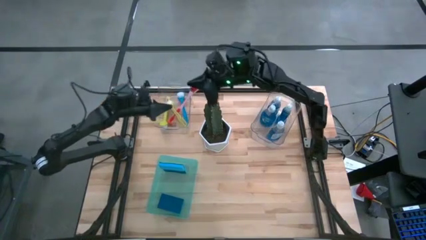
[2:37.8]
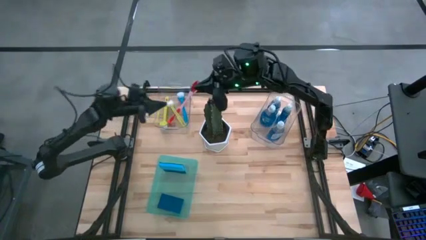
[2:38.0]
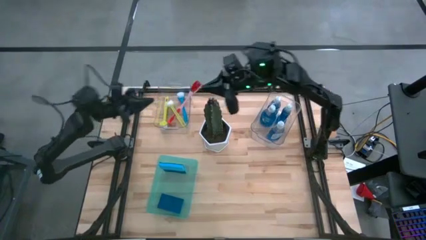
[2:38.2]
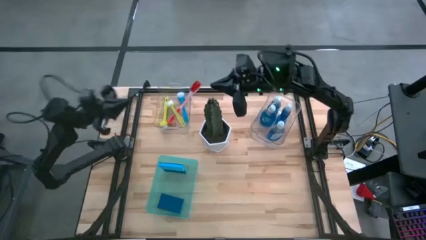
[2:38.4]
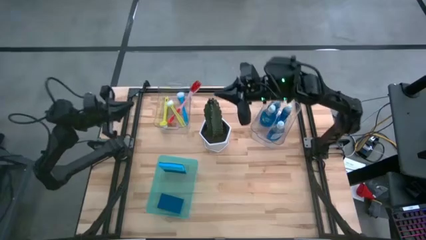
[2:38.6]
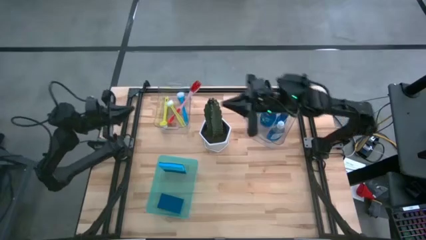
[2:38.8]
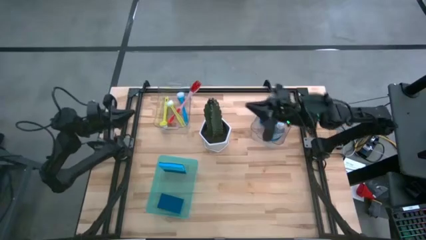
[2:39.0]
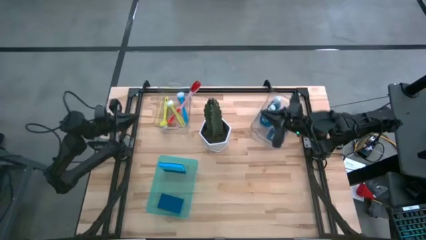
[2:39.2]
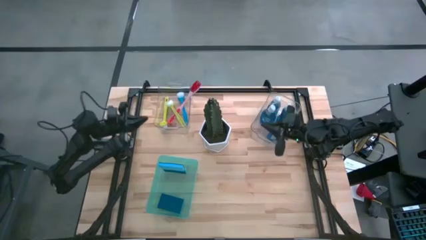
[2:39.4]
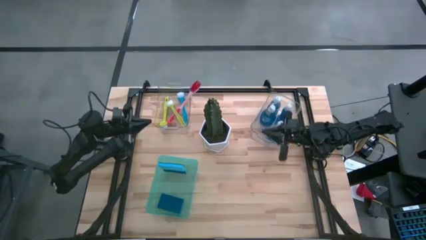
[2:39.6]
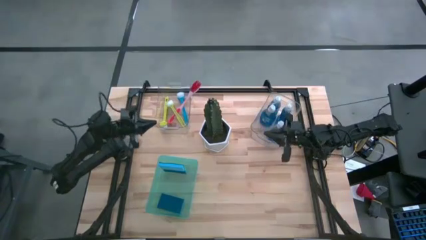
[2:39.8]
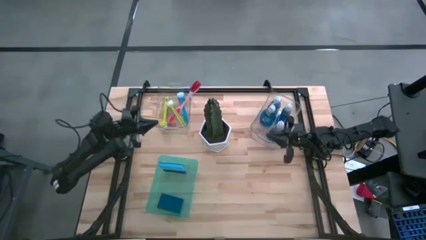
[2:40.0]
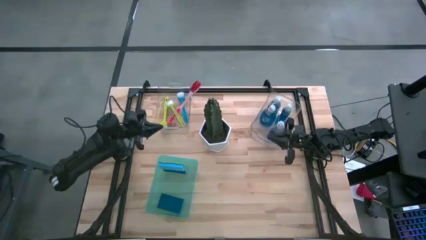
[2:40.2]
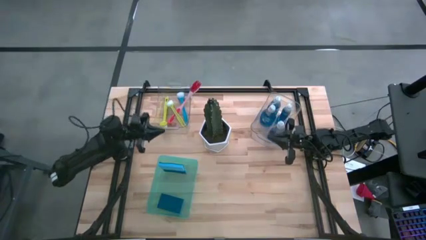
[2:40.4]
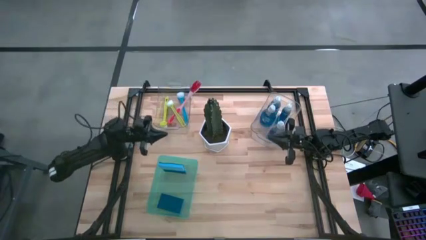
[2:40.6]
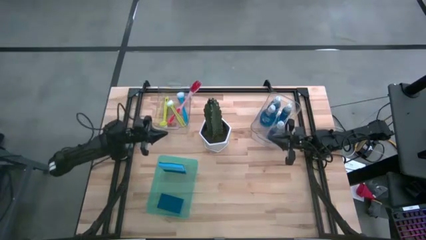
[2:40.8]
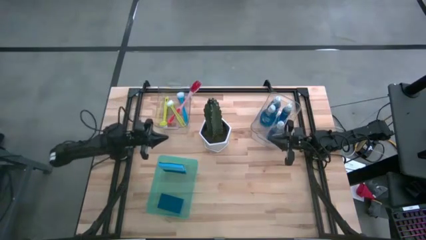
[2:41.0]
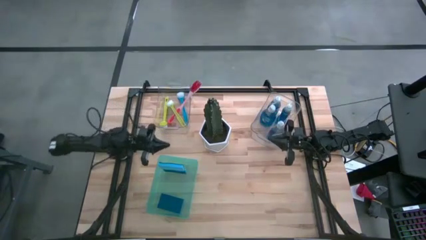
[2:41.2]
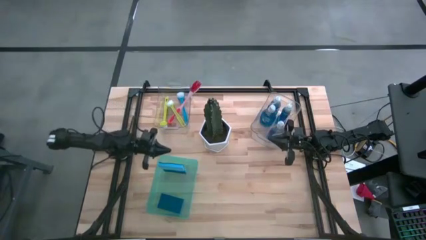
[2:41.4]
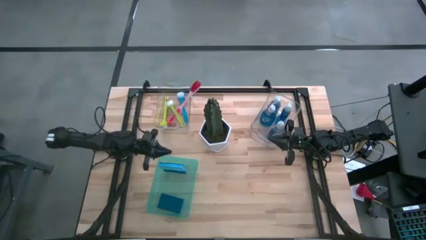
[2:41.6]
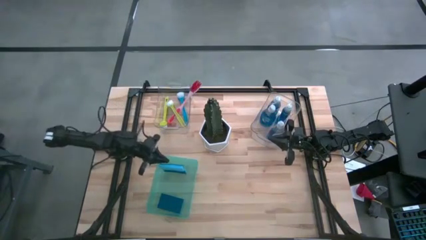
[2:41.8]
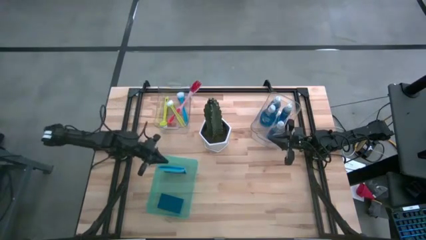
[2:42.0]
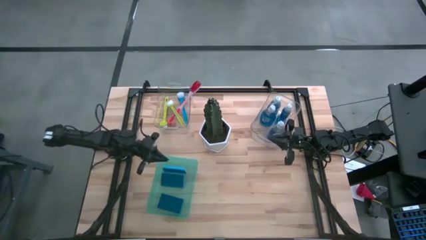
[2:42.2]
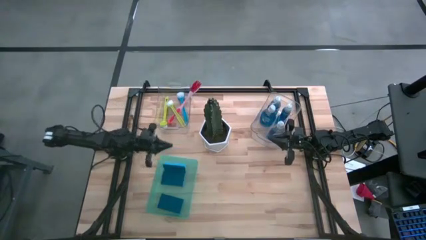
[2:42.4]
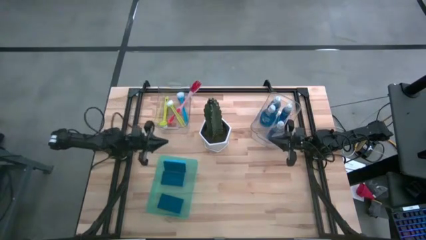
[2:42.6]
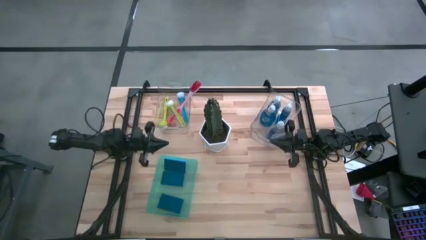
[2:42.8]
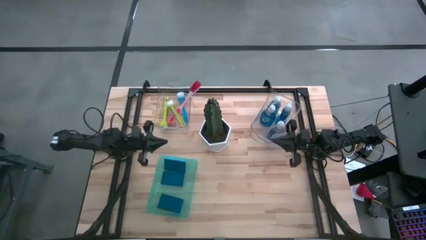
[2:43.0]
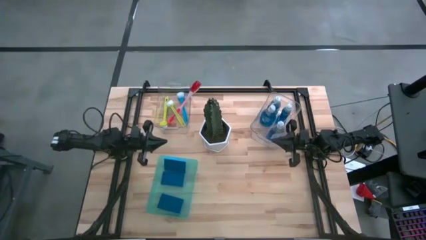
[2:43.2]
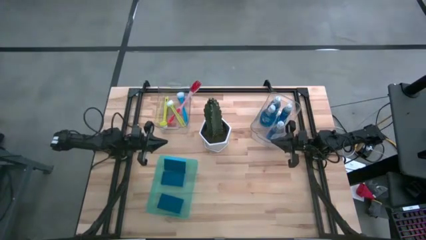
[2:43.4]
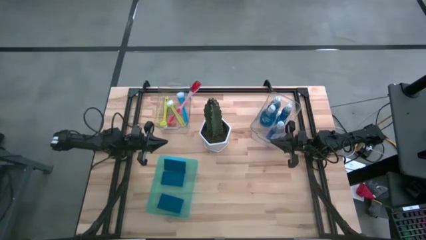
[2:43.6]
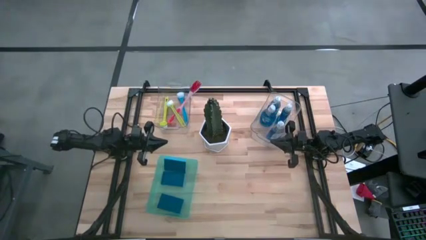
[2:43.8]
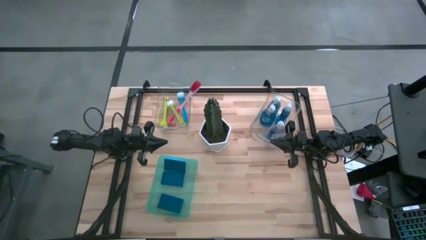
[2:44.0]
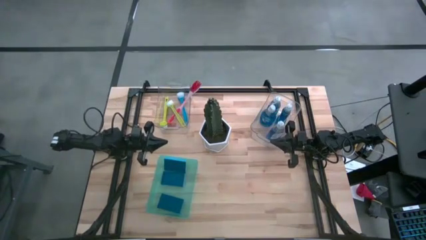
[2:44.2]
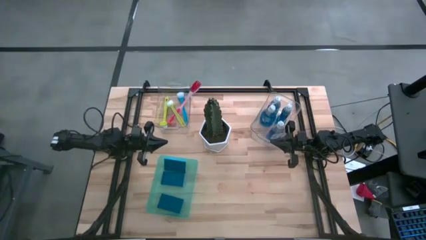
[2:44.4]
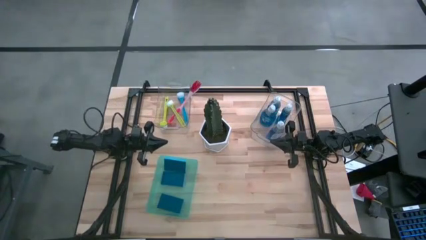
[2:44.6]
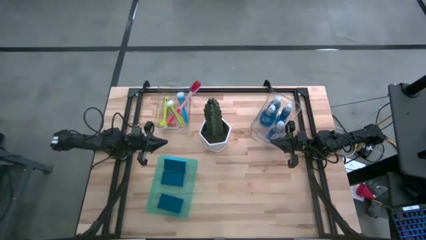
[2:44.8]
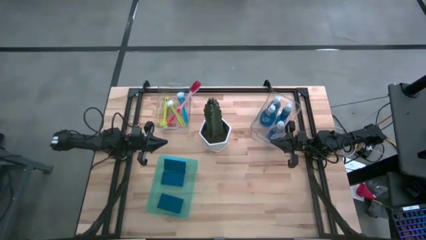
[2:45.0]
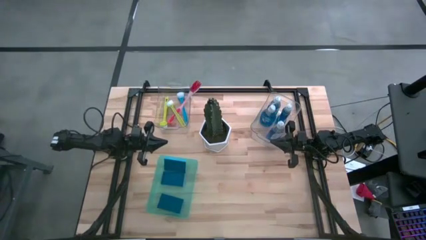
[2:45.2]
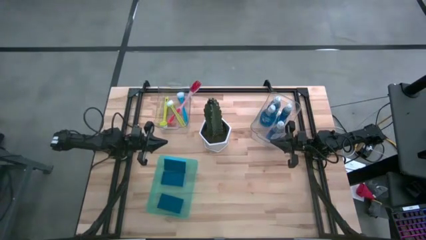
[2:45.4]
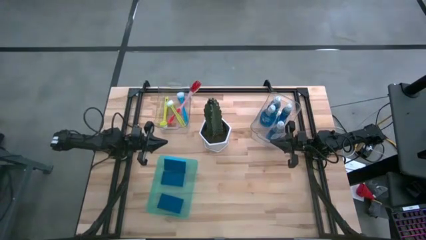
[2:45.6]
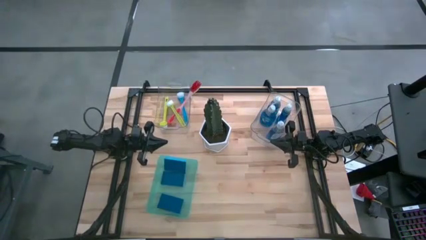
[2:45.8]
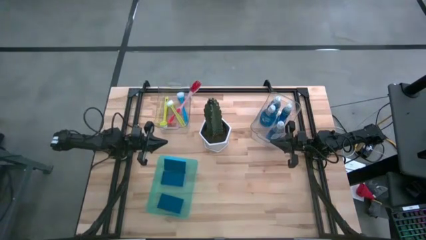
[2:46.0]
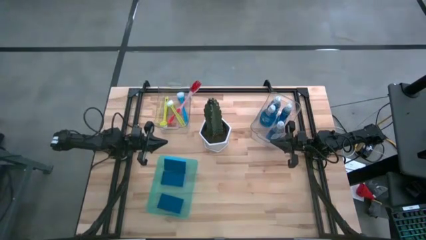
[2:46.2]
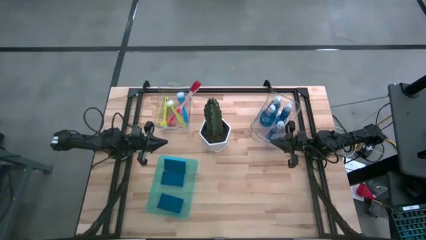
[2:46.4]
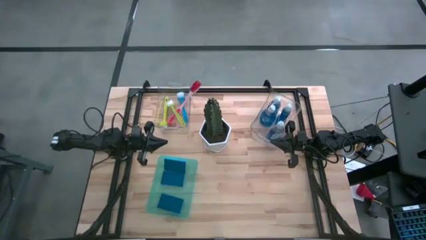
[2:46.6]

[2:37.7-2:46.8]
Task: Pick & Place Kitchen Sink Supplies
Return to Home Position

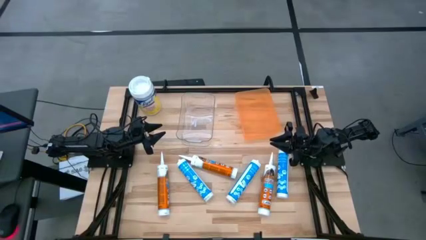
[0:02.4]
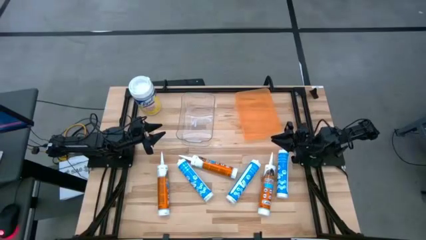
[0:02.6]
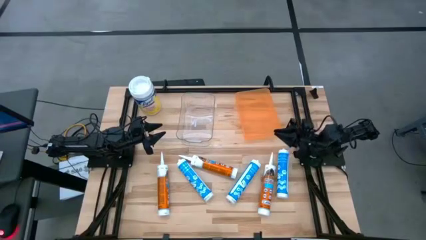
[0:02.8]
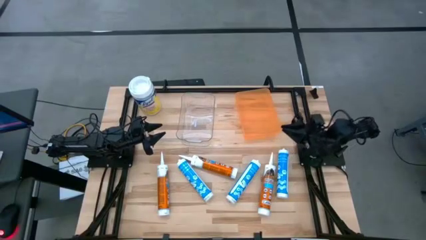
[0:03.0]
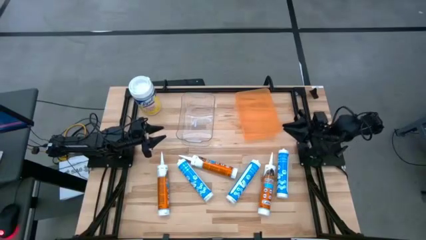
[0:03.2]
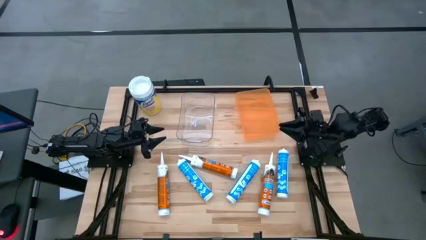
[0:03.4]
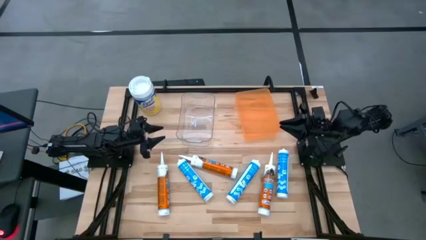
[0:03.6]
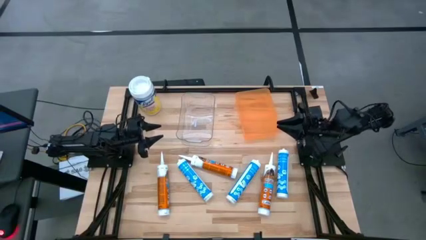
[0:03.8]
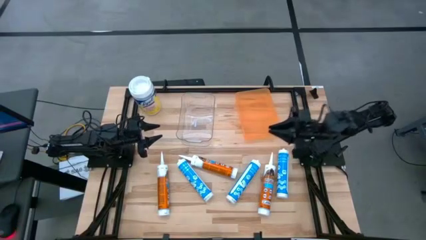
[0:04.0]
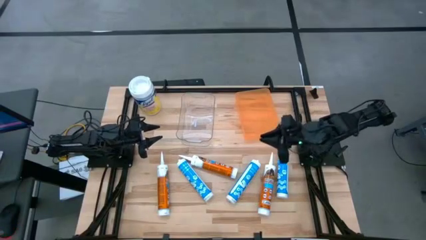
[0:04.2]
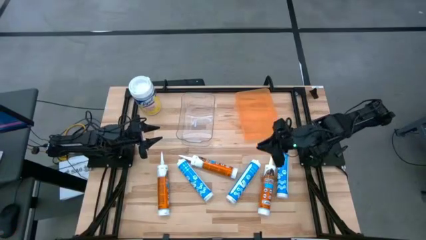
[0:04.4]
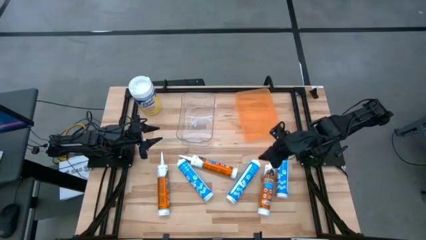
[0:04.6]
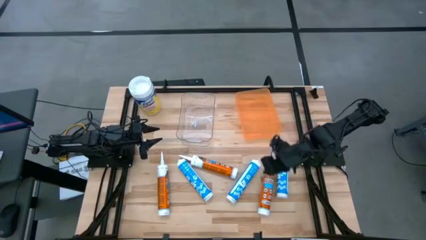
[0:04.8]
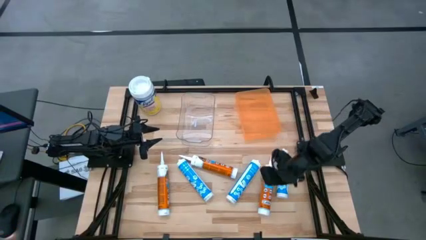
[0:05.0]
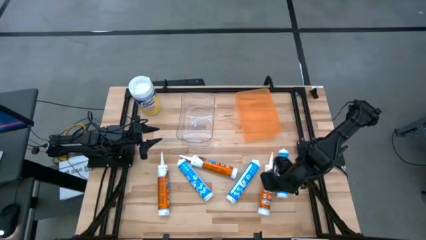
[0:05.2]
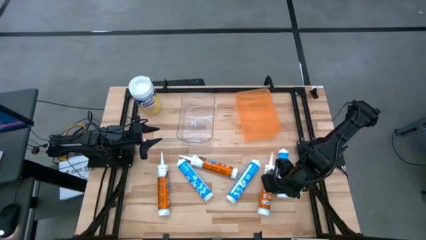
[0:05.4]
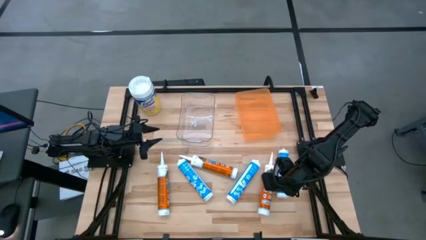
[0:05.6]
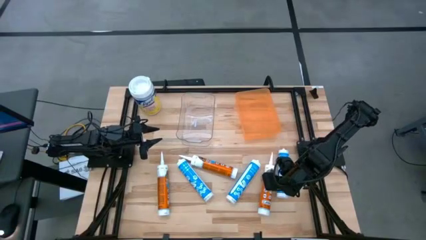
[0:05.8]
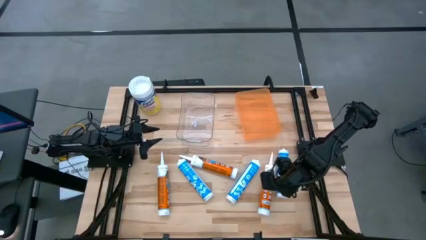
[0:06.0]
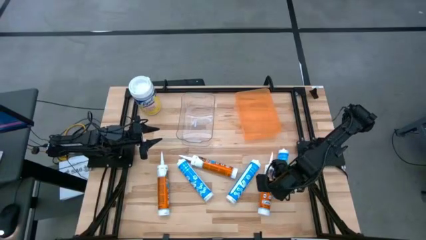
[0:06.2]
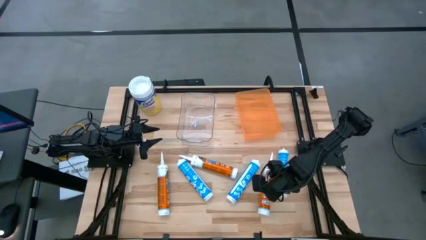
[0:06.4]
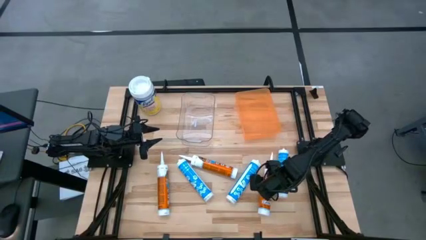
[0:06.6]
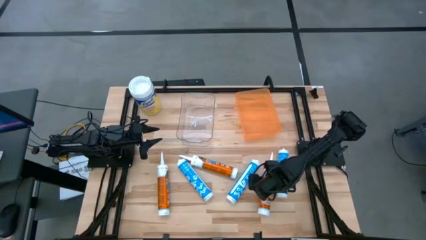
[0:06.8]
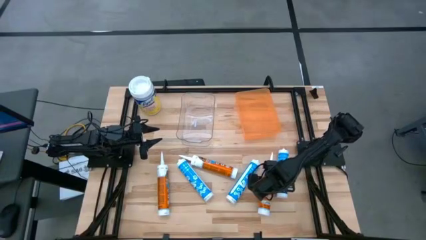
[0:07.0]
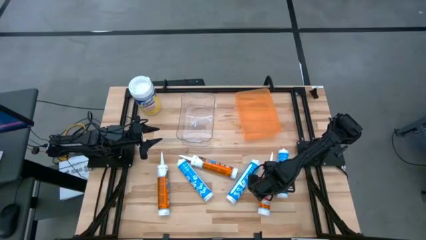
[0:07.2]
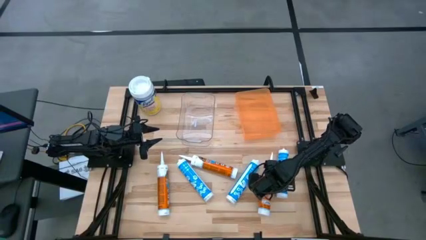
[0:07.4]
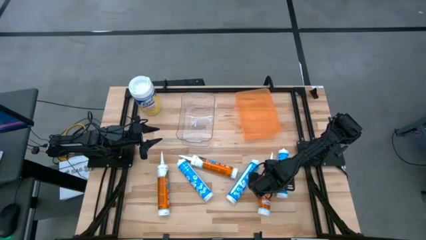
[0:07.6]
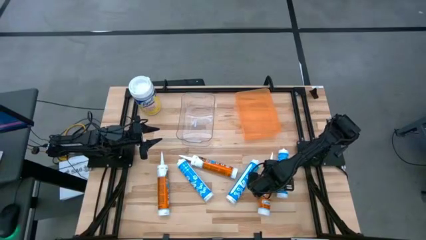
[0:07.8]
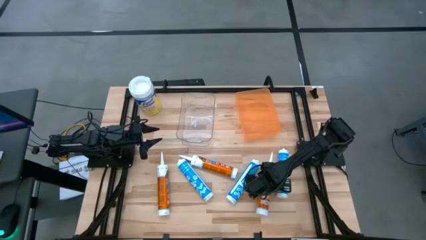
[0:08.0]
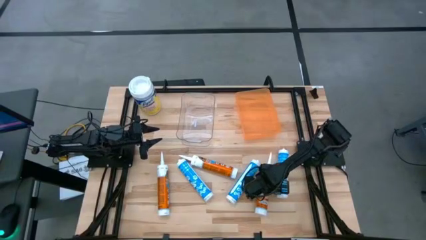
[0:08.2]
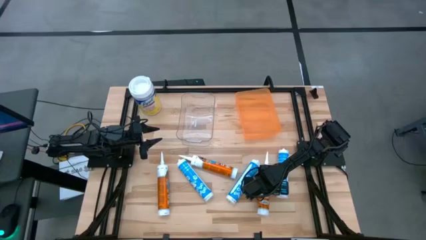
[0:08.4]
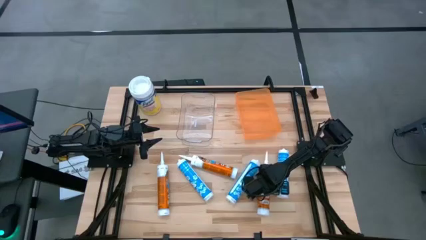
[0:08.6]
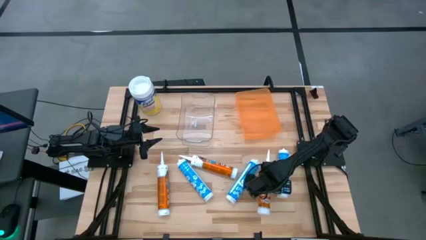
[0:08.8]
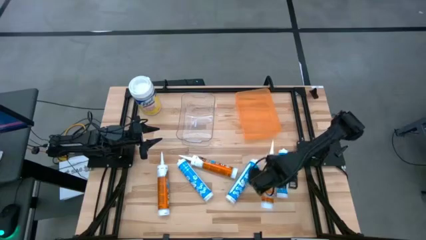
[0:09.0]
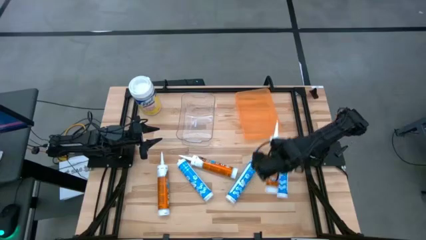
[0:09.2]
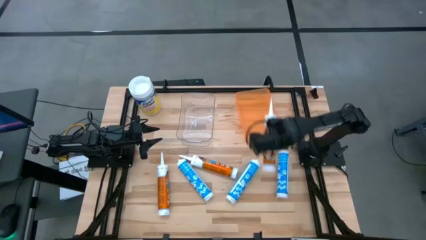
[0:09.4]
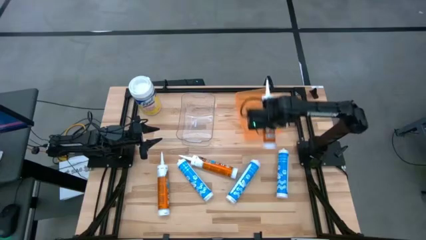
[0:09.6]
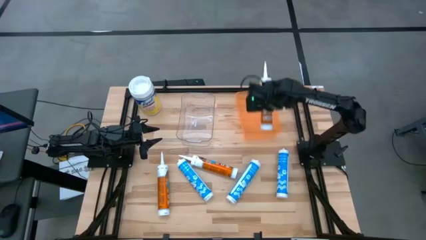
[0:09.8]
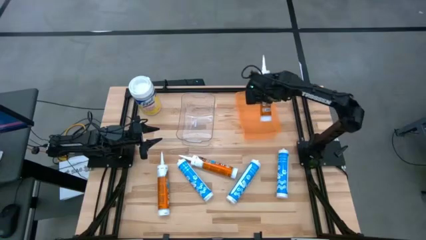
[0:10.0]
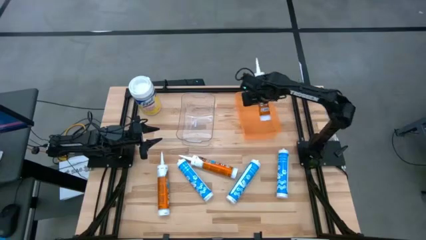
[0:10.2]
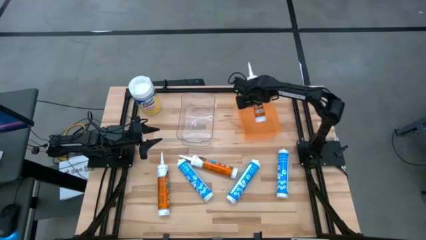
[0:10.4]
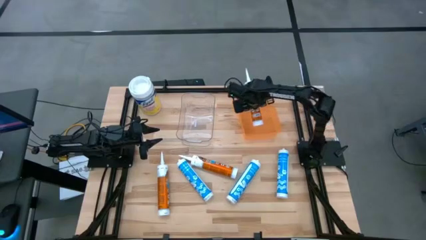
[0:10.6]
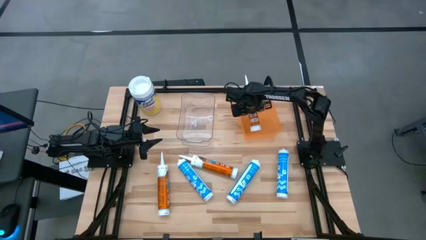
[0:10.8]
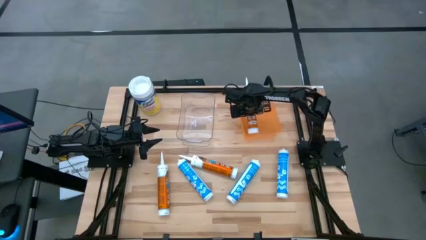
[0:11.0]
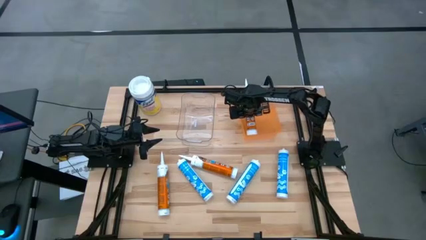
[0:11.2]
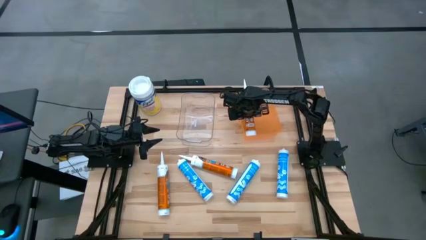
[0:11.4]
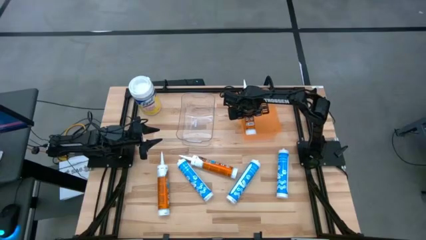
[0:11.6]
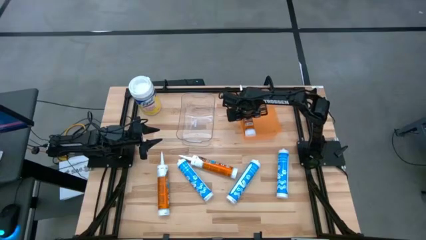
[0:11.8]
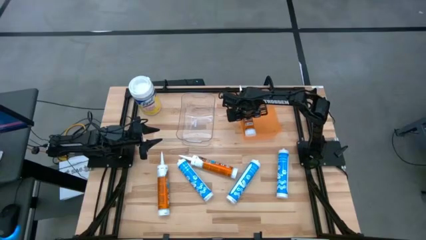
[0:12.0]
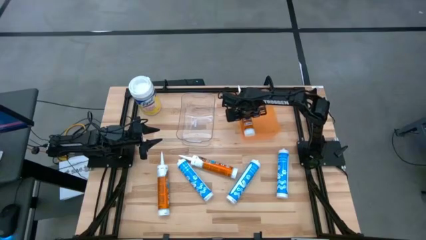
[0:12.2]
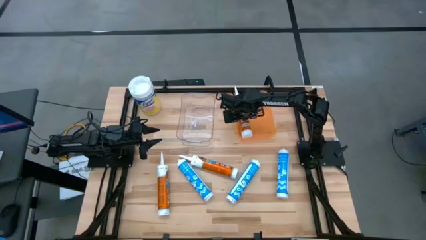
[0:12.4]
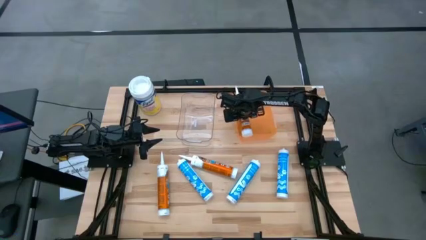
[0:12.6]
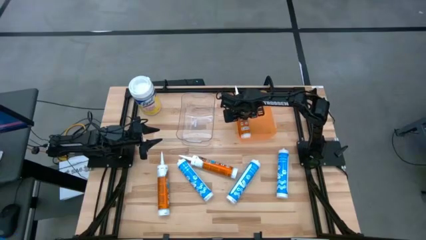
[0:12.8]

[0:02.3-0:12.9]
Task: Pick & place silicon tubes, Sealant and Lysol wipes
Put the orange sealant into the orange bin
